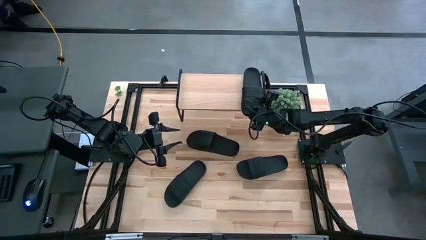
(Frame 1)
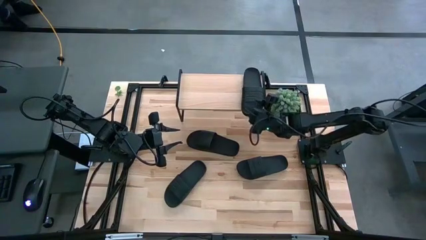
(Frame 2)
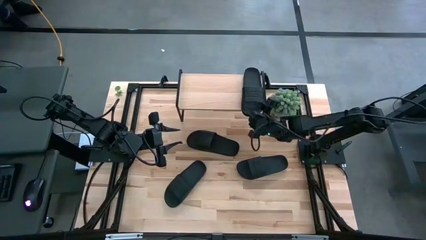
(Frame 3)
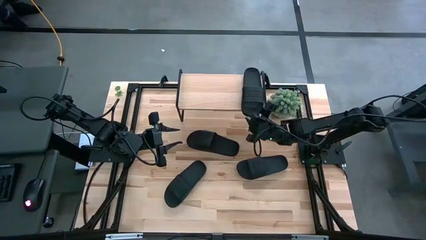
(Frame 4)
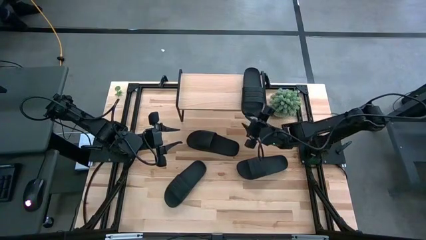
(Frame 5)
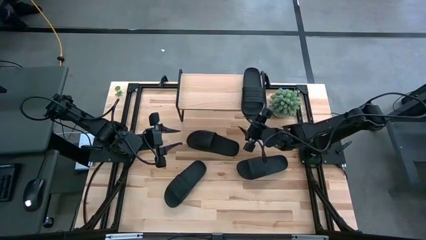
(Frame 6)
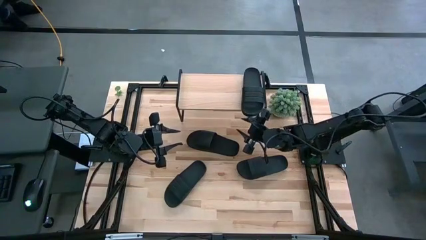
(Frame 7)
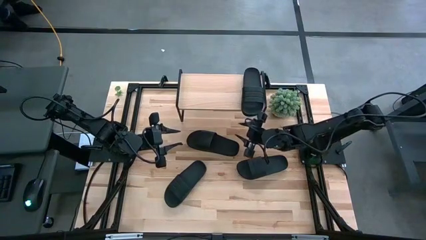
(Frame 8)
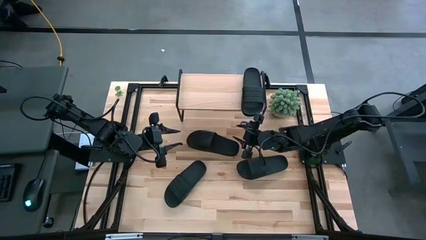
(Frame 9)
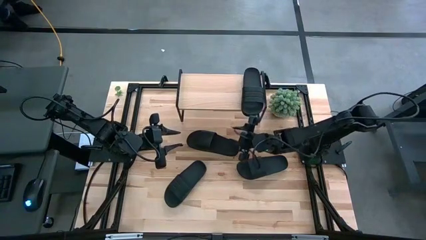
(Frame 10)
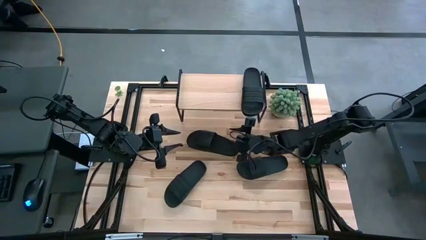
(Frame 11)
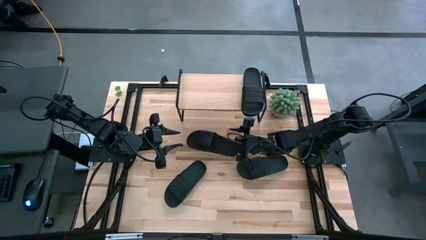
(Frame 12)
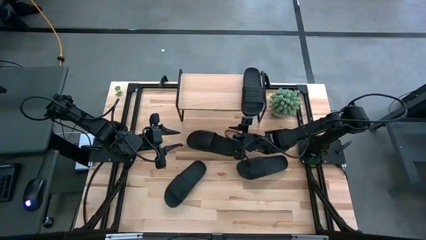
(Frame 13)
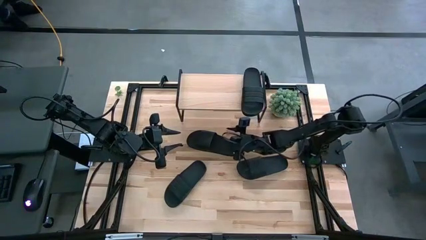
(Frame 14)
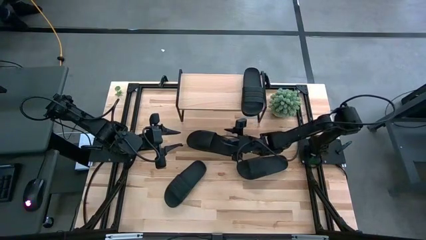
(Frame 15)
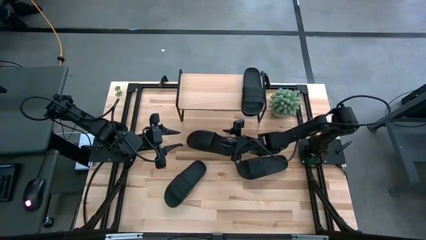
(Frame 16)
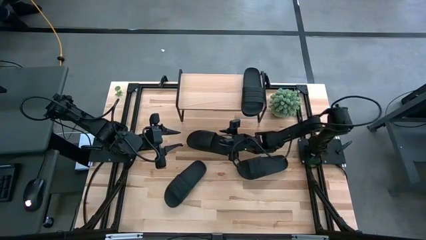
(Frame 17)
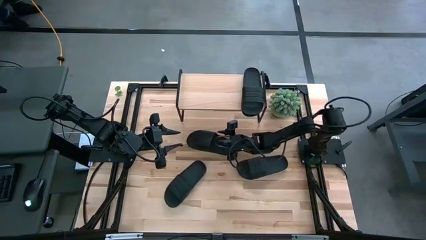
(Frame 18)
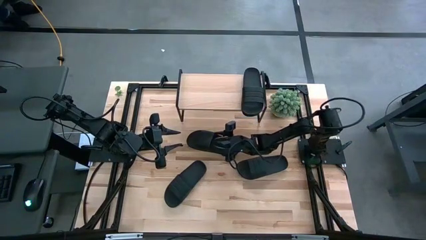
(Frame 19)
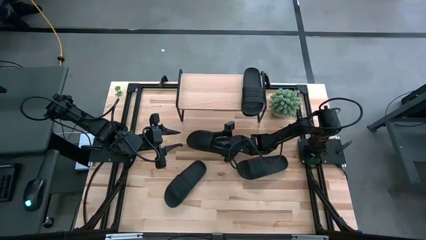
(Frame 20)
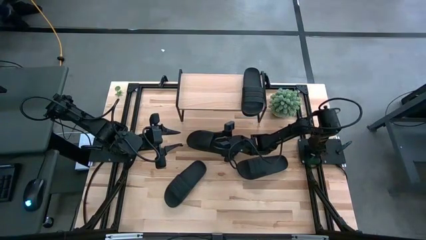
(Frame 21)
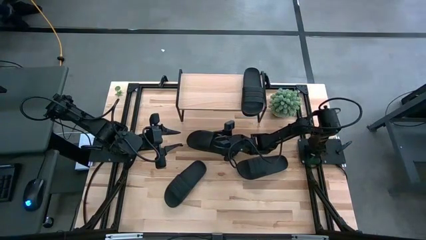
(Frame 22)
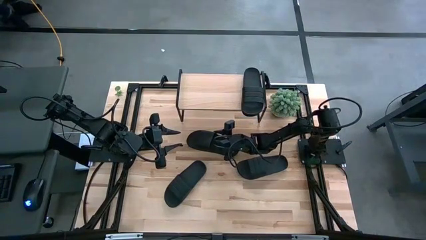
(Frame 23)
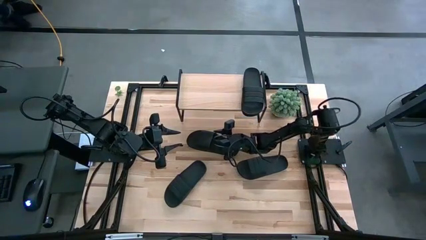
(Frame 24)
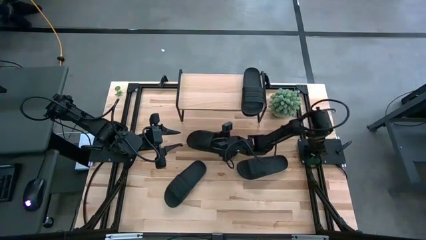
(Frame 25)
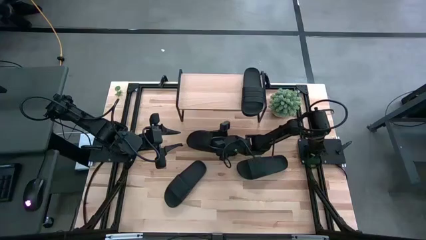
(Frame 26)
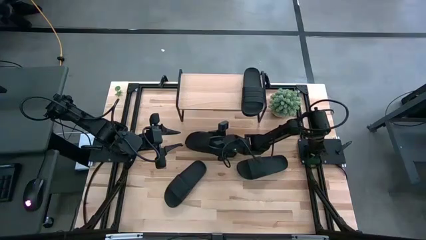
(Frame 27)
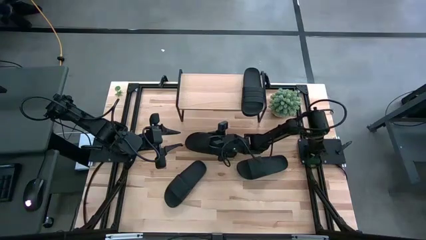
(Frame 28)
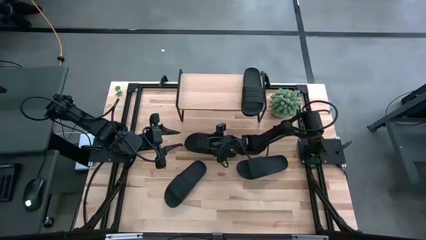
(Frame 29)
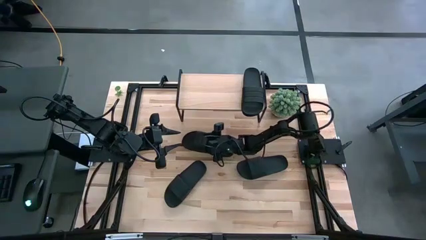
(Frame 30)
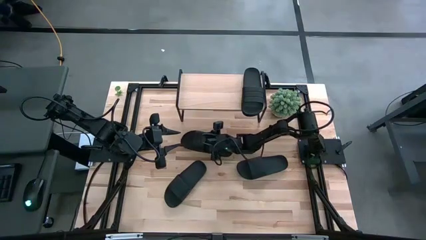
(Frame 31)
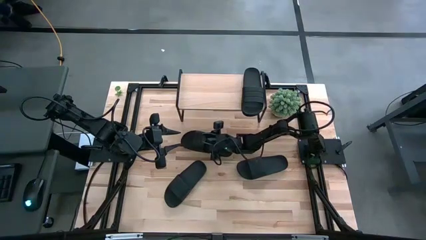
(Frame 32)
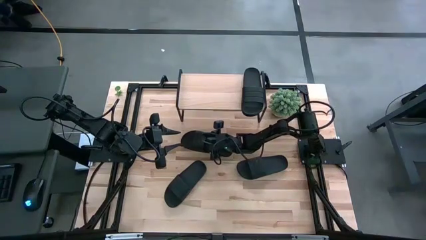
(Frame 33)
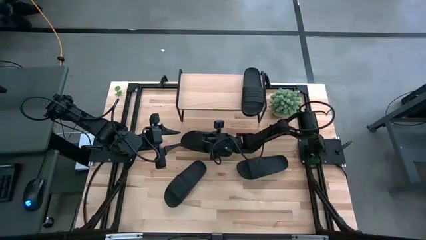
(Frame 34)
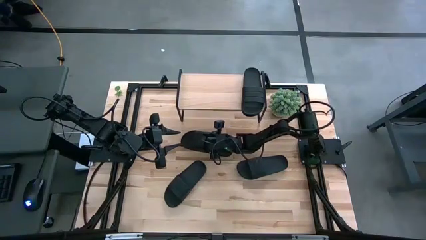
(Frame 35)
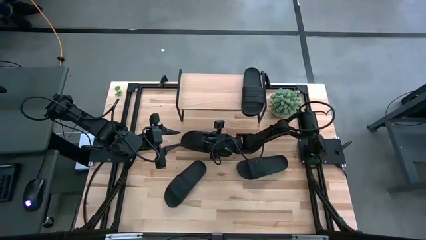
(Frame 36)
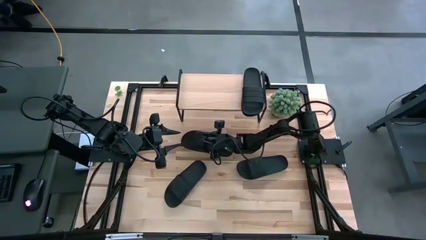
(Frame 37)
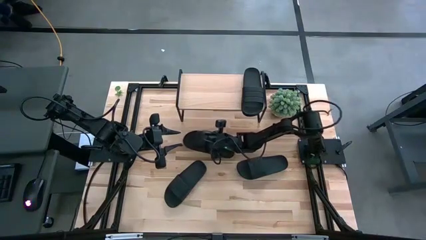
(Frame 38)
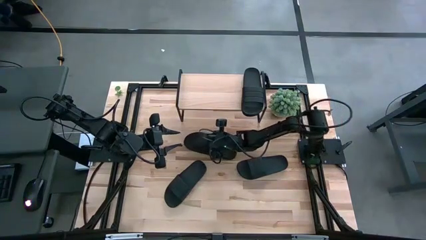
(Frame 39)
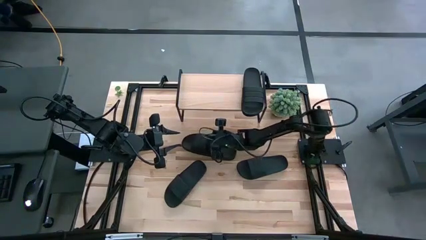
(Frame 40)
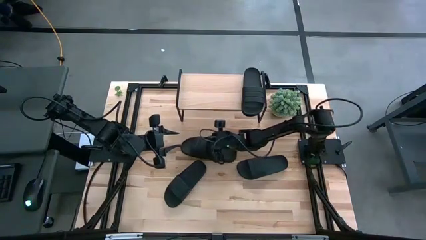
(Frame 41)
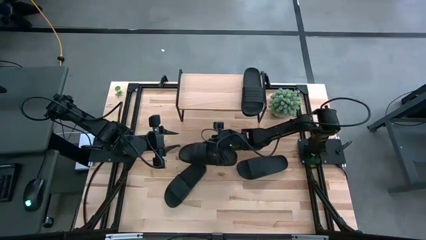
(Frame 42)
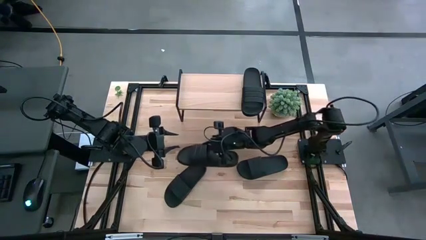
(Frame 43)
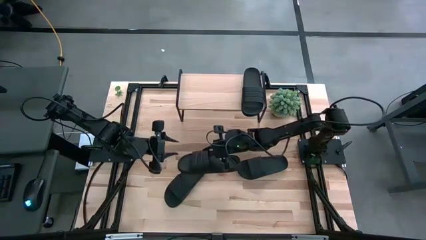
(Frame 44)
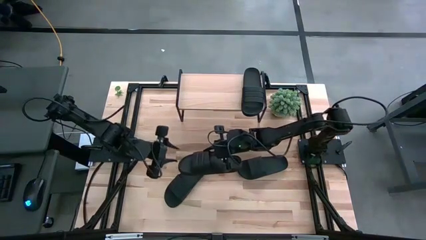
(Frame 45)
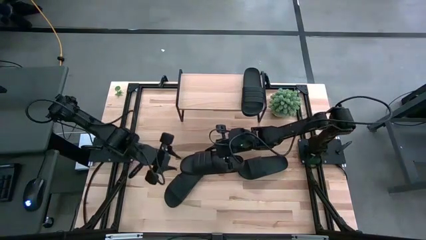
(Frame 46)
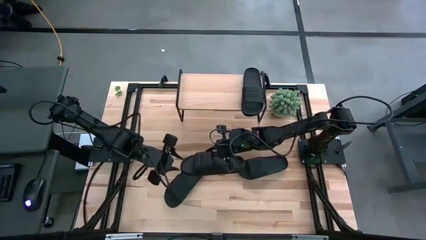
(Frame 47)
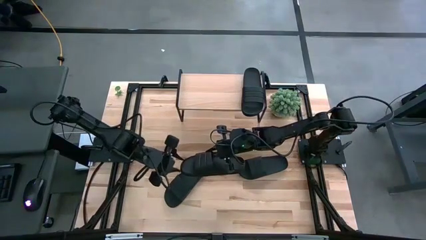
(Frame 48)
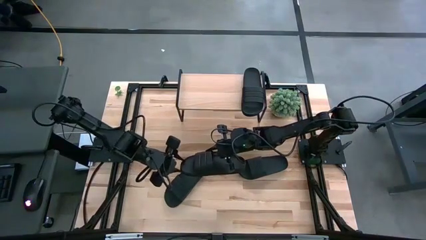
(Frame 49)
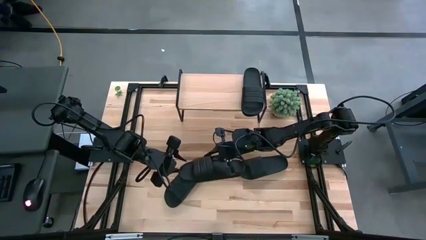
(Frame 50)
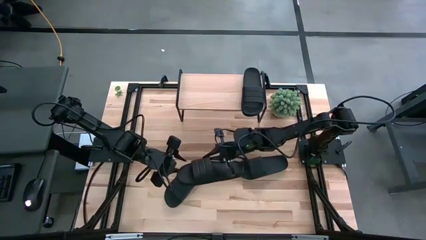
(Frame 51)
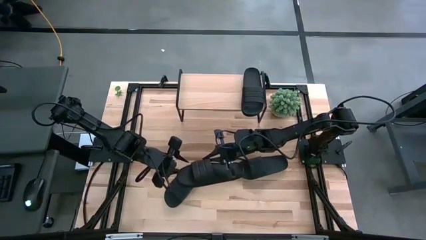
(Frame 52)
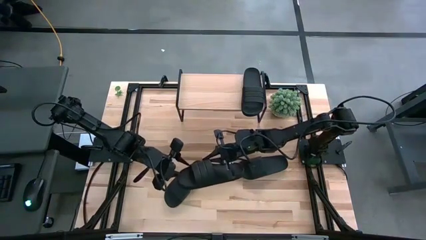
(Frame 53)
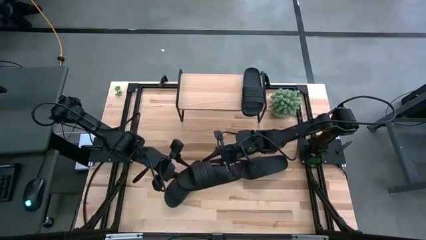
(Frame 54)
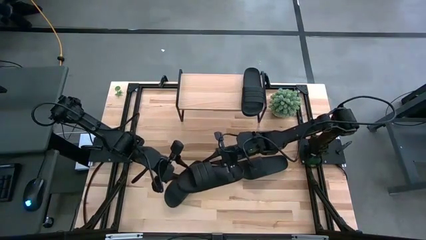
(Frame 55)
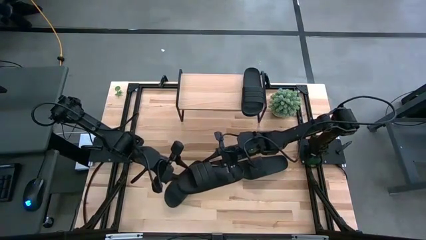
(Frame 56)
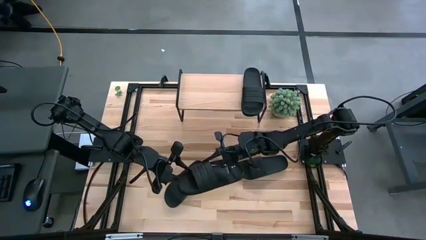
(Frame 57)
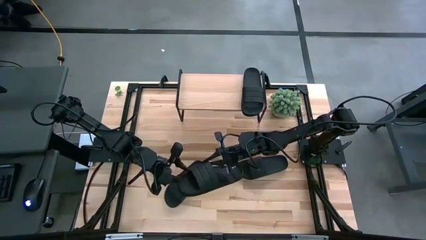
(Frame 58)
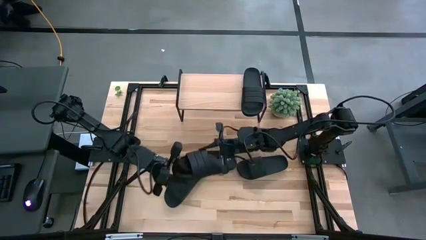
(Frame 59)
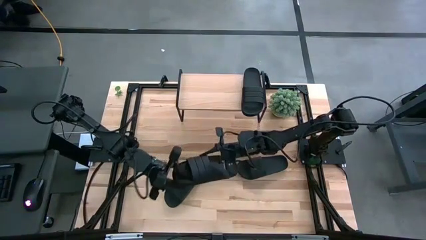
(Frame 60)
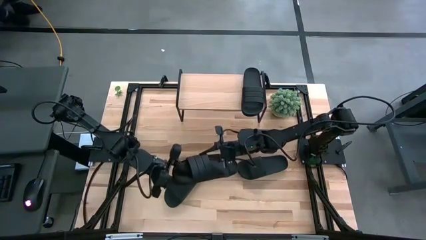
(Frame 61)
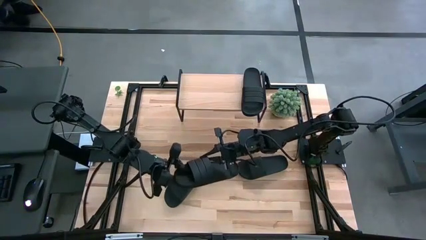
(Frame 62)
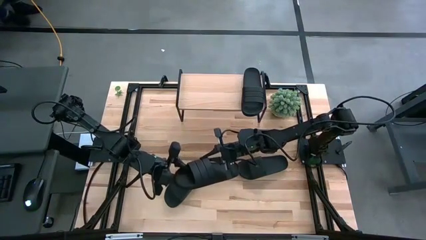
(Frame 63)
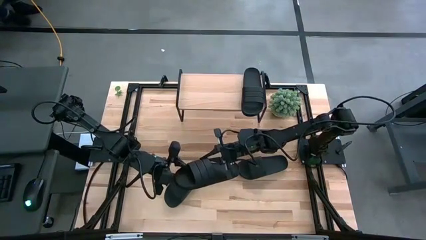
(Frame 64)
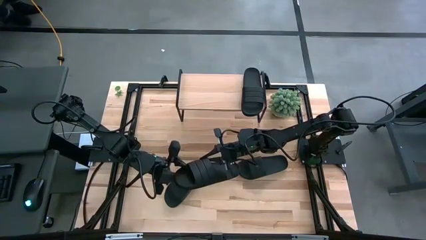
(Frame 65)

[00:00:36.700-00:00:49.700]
Task: Pick and place slides into the shelf
Put the black slipper on the shelf

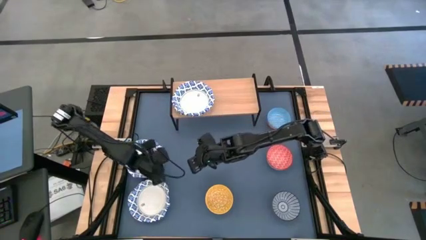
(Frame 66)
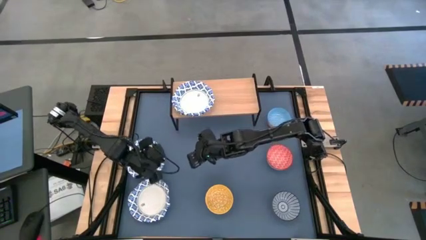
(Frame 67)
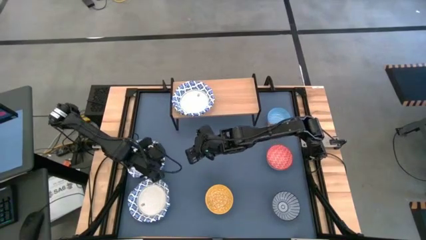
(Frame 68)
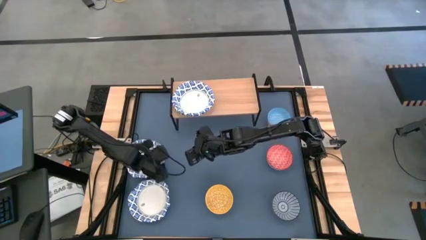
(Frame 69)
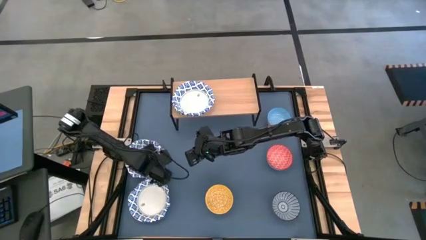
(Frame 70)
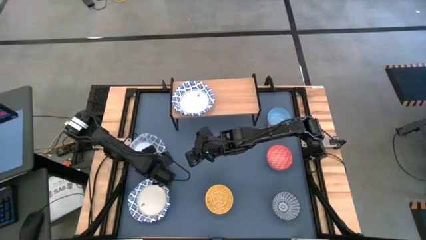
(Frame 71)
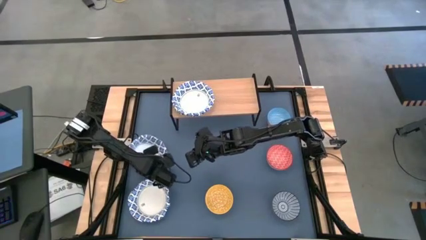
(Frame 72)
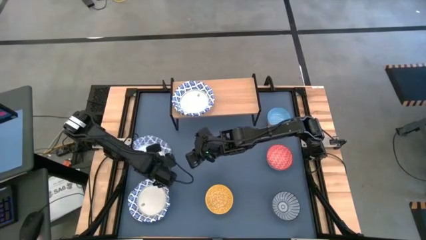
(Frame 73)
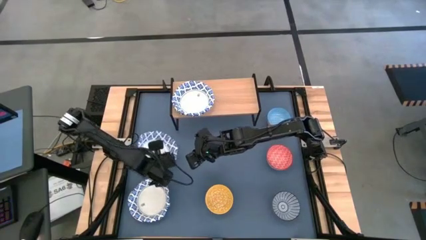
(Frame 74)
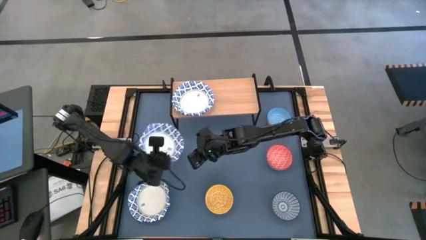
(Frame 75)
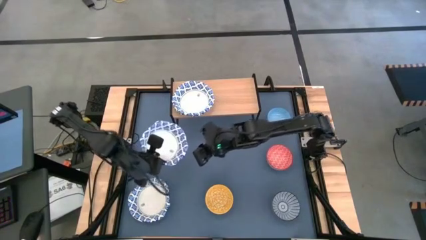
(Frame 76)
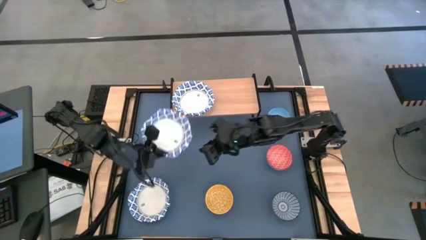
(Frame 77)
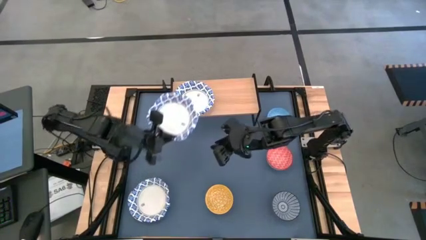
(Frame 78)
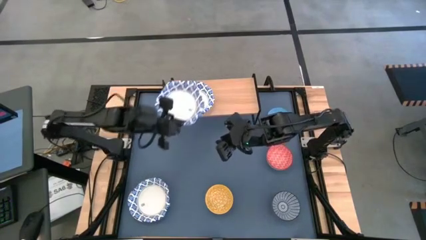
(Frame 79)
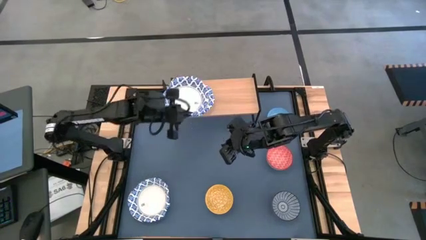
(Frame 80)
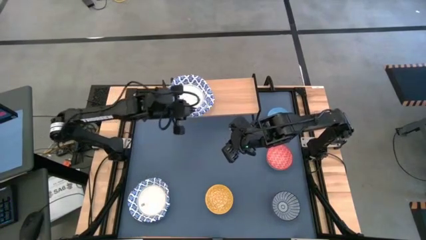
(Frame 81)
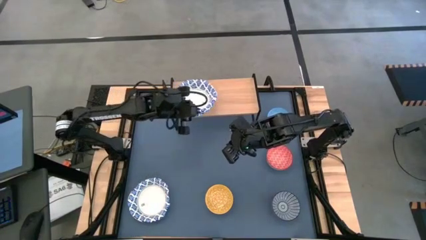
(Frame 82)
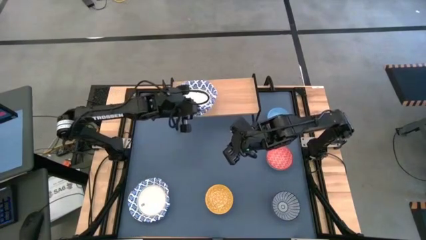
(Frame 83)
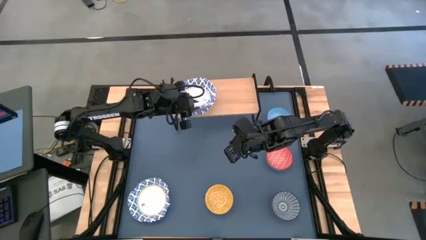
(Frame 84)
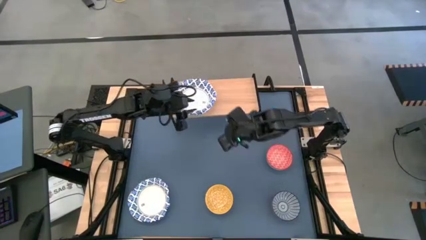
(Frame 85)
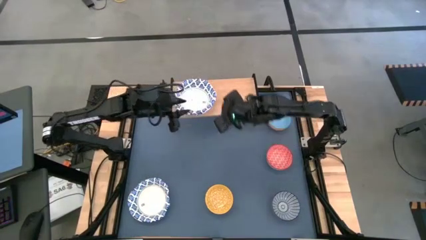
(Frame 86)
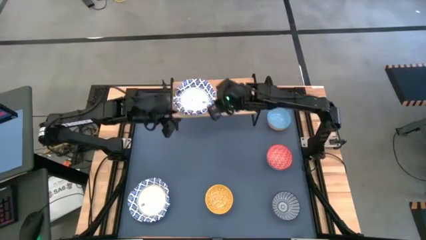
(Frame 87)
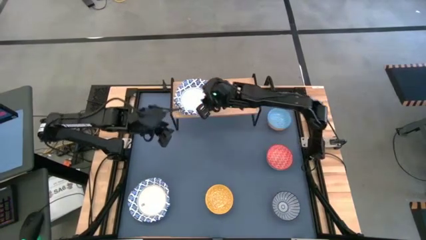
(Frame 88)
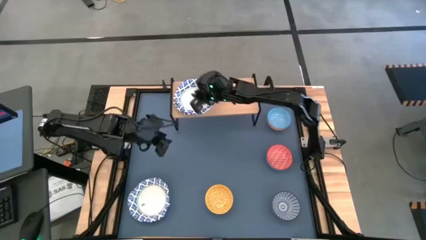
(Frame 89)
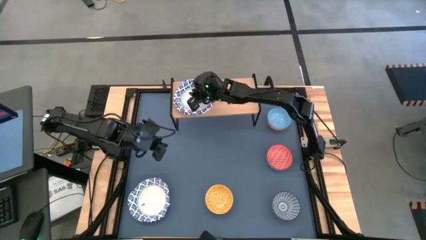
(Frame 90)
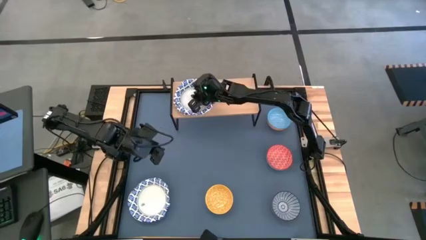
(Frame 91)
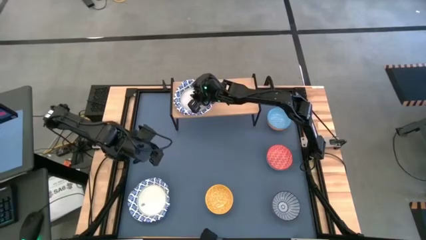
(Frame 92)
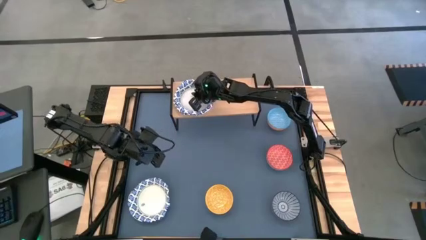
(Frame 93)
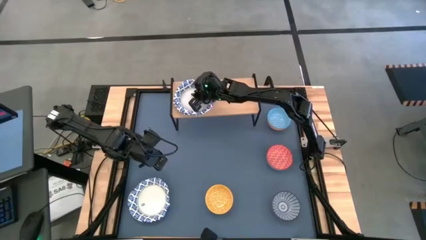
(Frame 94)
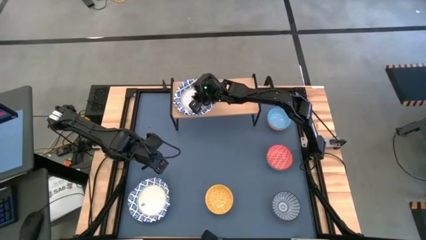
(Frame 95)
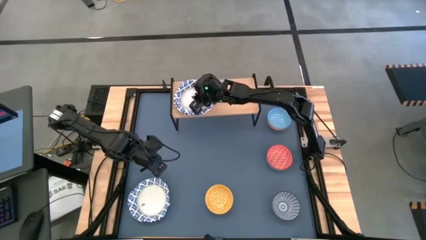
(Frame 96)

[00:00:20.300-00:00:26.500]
Task: Place and stack bowls onto a shelf
Stack the white bowl on top of the white bowl on the shelf
